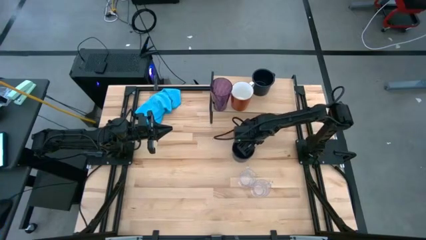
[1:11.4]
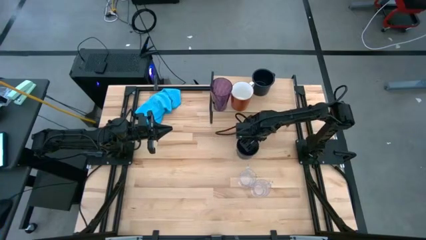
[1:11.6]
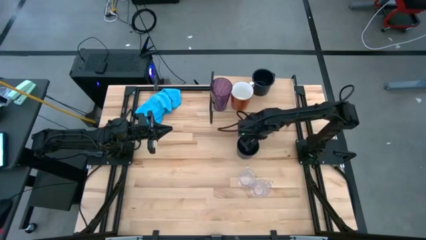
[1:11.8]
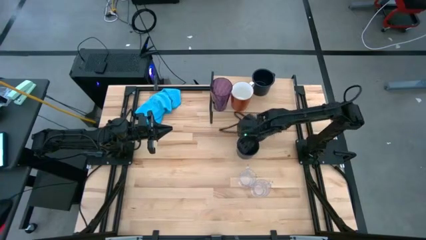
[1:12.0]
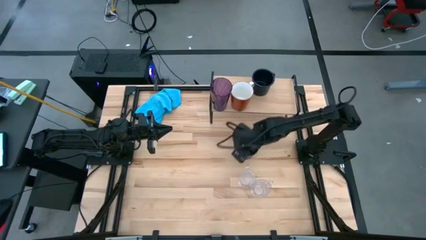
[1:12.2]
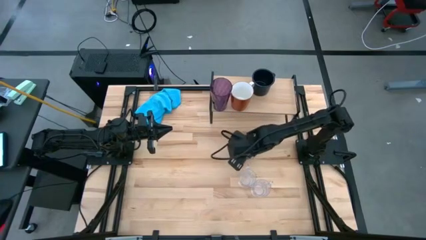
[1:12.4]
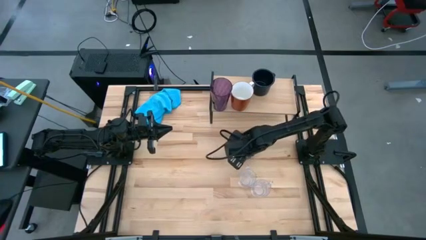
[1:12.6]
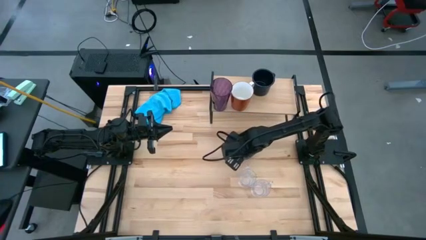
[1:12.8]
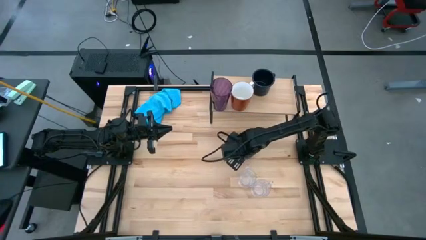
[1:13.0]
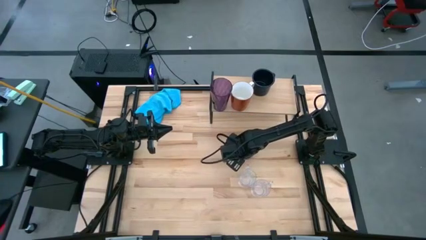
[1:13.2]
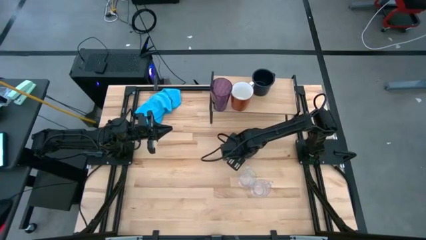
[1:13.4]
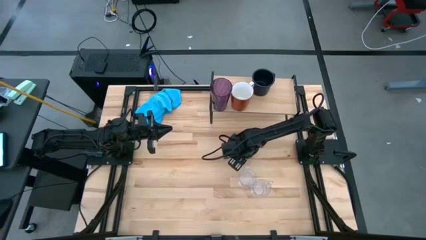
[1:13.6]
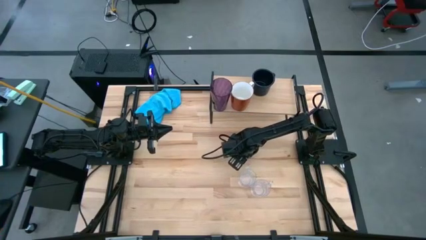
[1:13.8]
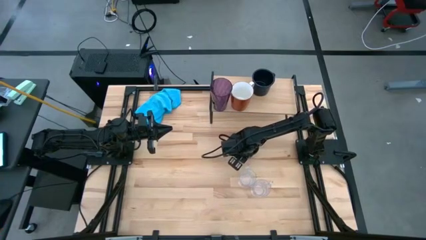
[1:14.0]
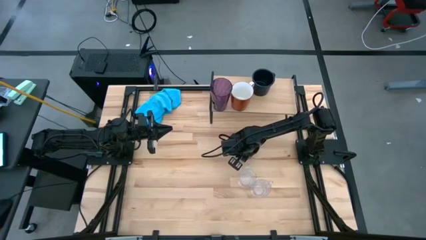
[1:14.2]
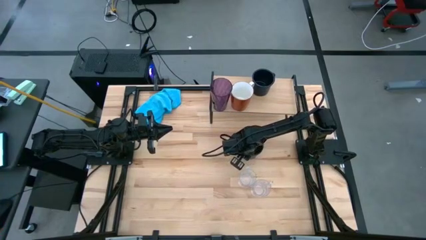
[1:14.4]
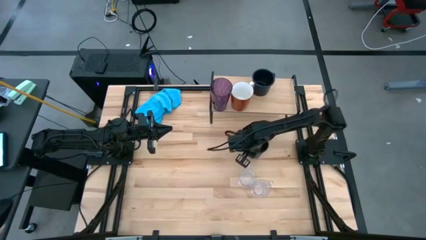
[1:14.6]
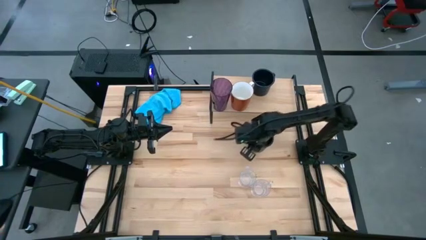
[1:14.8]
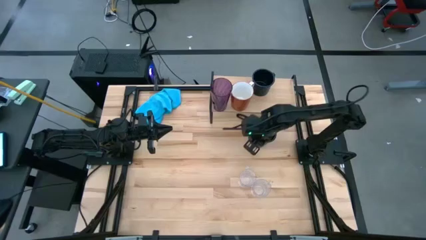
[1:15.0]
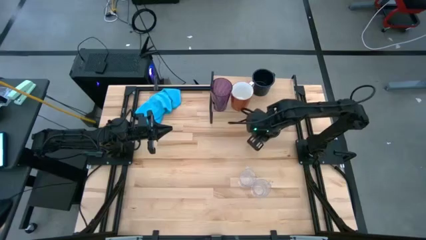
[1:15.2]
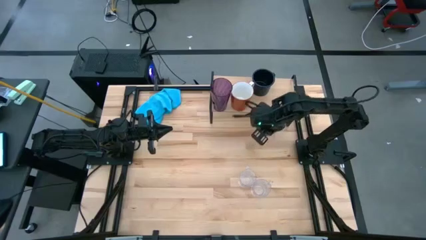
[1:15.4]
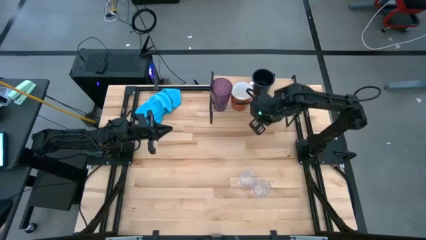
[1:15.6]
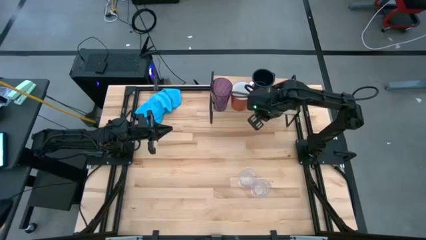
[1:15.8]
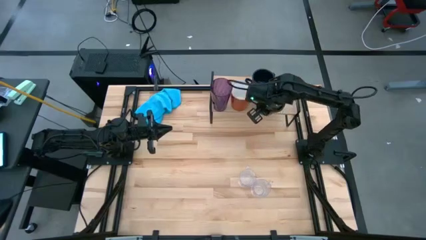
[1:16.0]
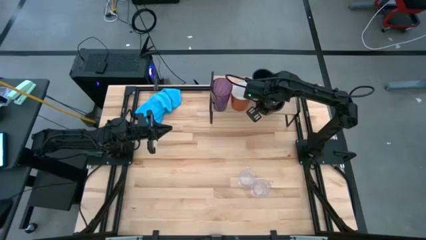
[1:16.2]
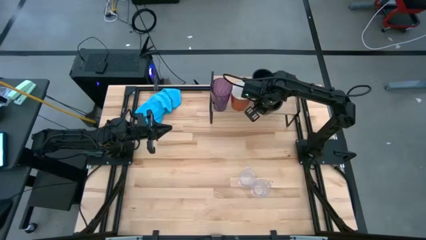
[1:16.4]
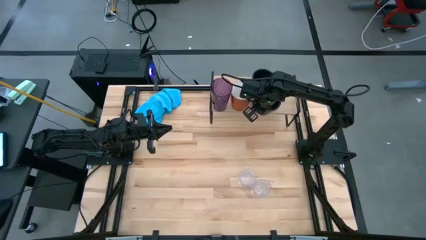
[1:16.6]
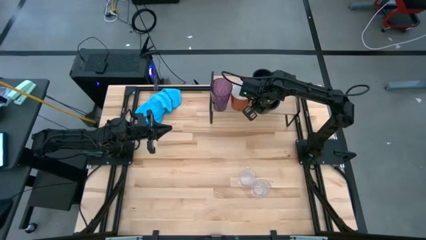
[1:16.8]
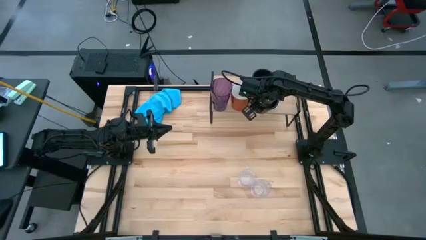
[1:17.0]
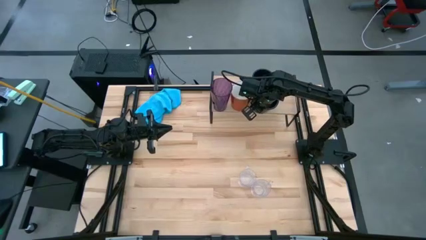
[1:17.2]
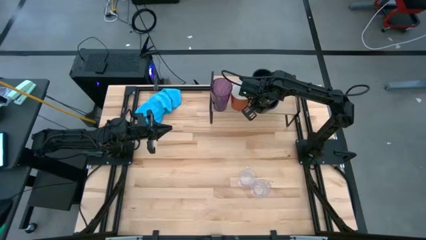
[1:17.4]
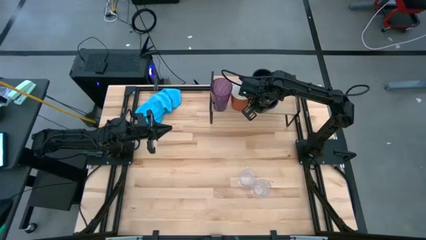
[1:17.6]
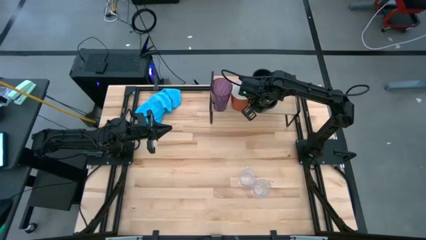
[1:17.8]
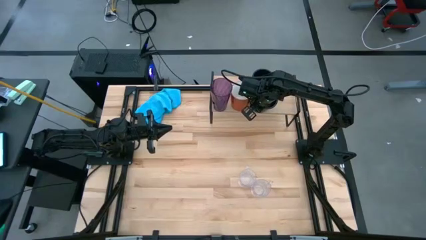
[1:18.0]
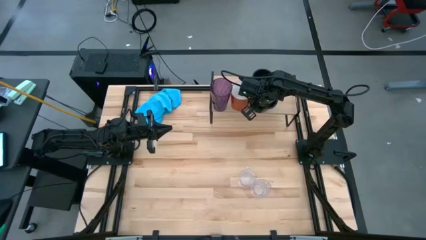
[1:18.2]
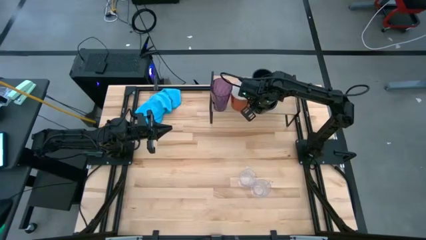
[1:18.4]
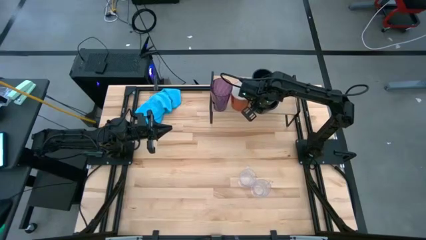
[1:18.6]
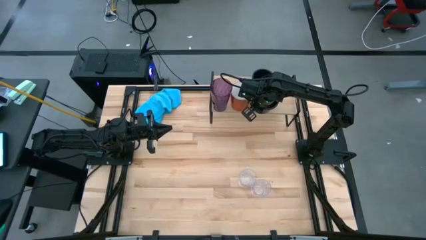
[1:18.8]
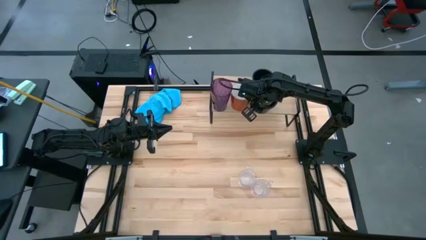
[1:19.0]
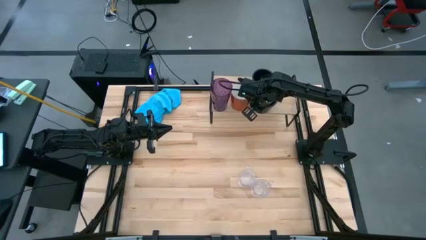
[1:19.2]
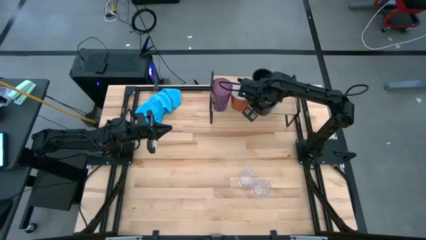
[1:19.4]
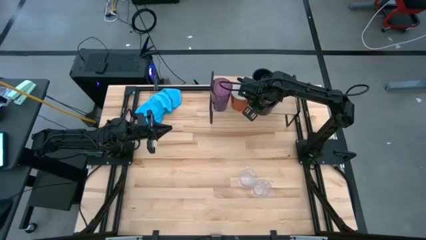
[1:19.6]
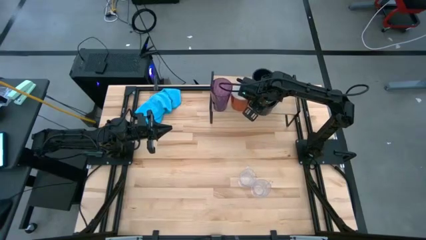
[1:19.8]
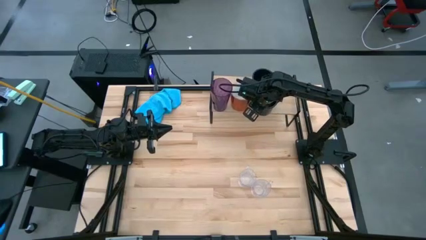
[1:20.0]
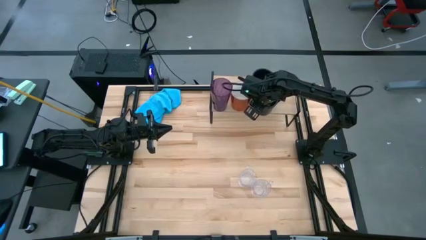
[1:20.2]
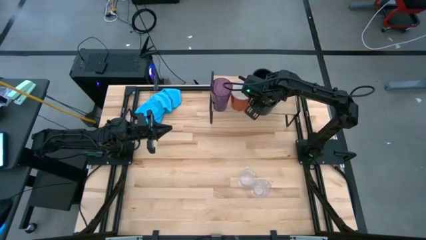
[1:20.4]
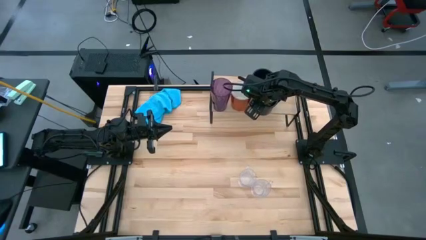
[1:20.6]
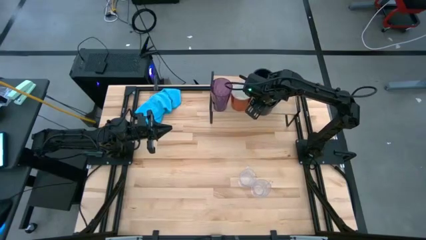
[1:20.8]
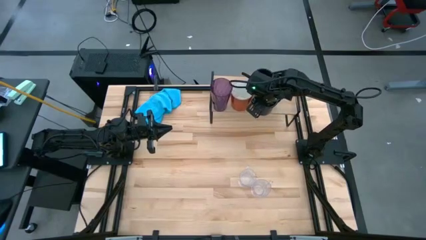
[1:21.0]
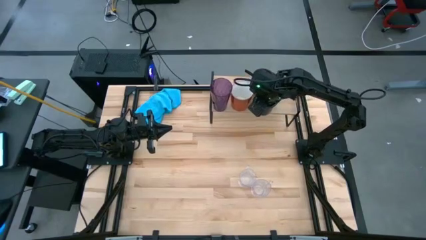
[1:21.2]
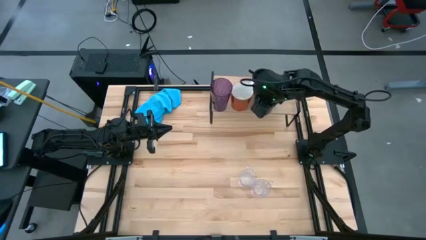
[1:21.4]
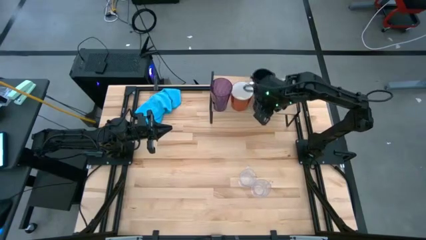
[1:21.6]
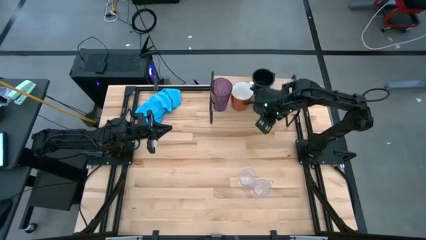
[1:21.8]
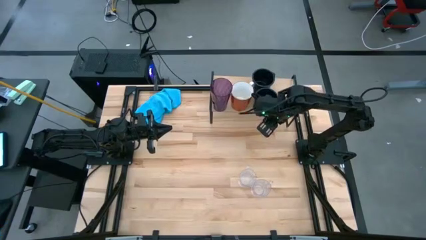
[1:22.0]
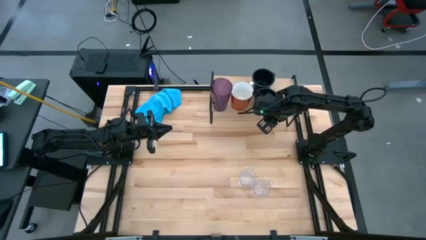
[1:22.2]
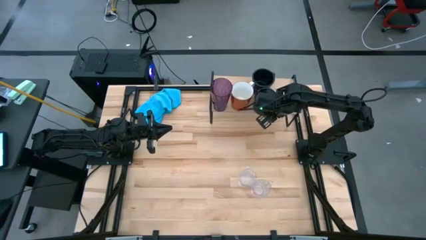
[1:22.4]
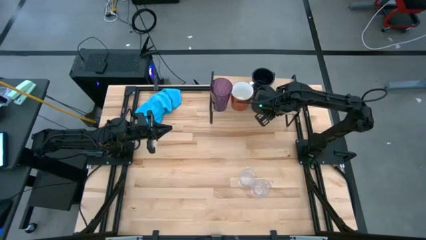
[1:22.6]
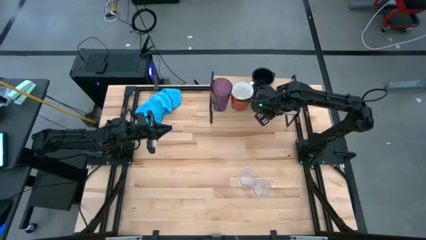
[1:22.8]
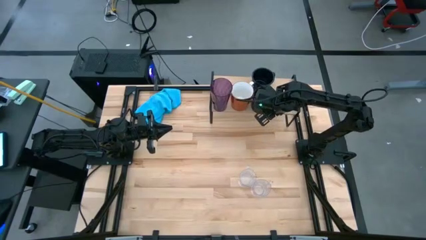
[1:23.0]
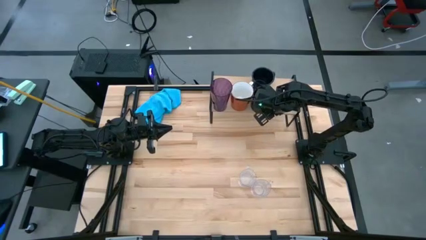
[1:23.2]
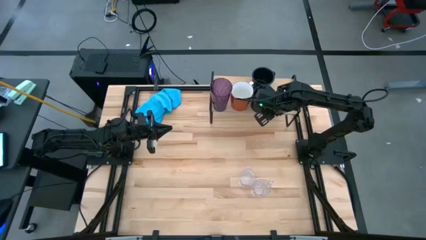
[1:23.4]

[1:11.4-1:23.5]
Task: Stack small to large cups/mugs on shelf
Put the black mug on the shelf aligned with the other black mug

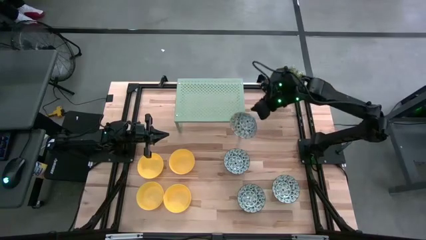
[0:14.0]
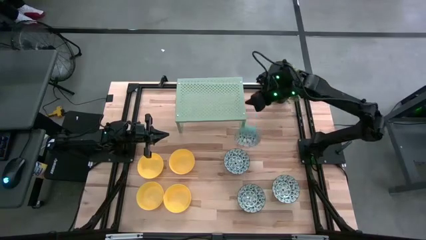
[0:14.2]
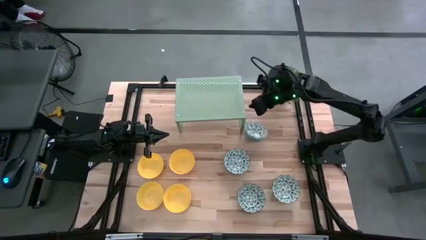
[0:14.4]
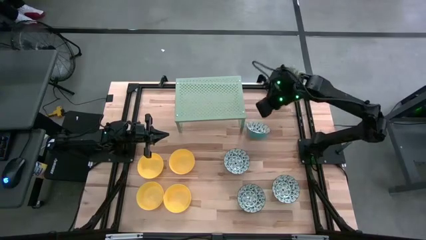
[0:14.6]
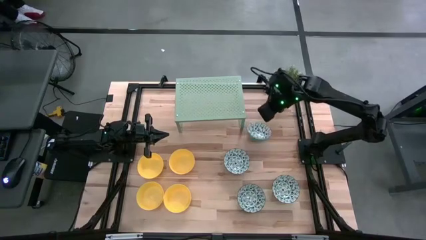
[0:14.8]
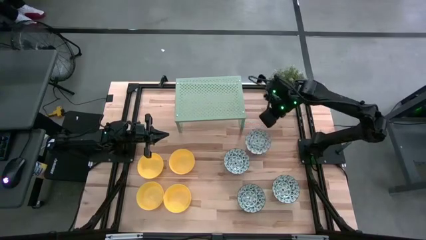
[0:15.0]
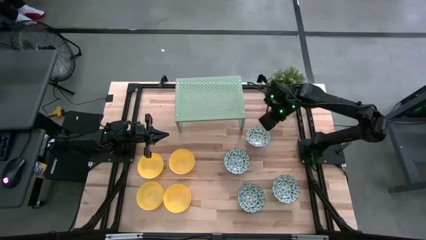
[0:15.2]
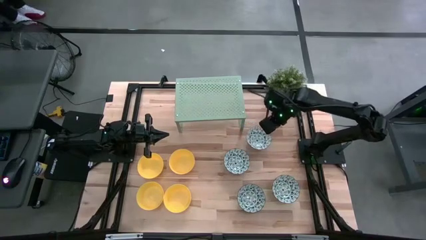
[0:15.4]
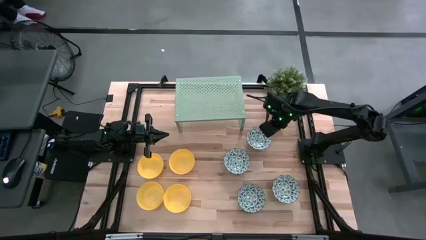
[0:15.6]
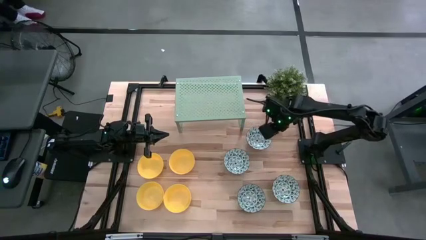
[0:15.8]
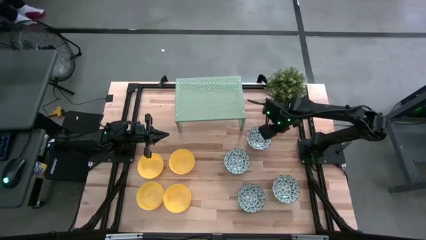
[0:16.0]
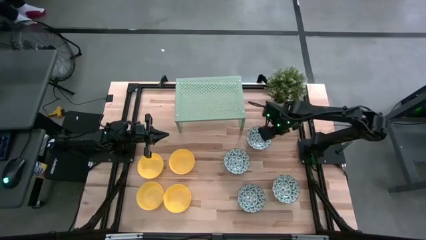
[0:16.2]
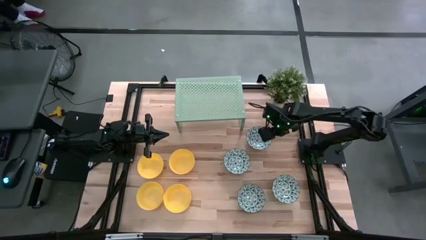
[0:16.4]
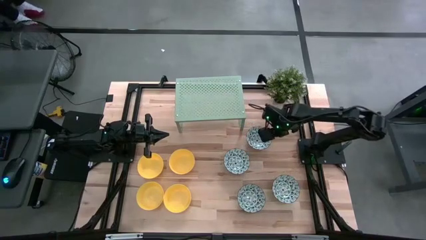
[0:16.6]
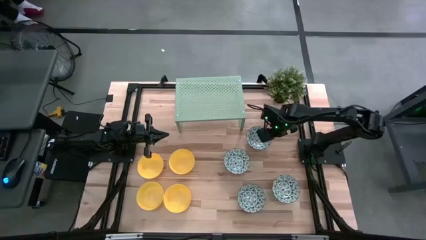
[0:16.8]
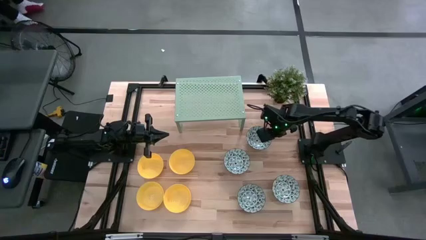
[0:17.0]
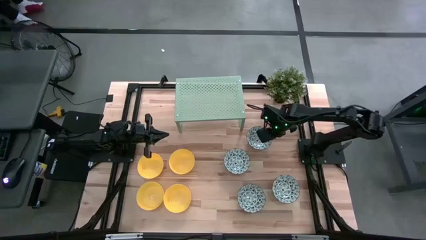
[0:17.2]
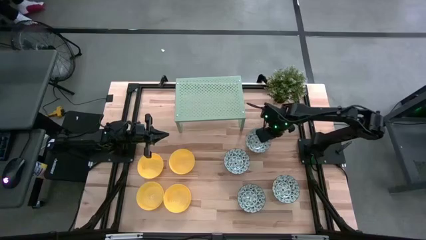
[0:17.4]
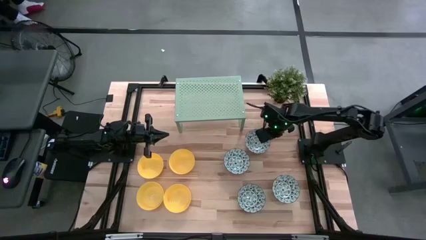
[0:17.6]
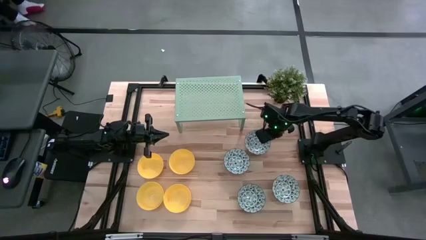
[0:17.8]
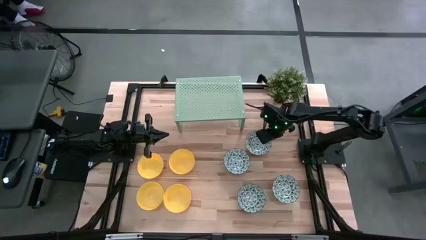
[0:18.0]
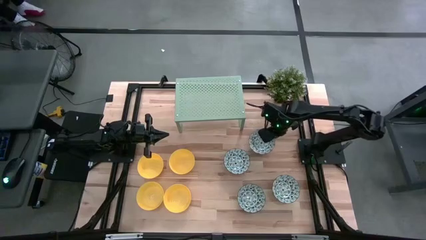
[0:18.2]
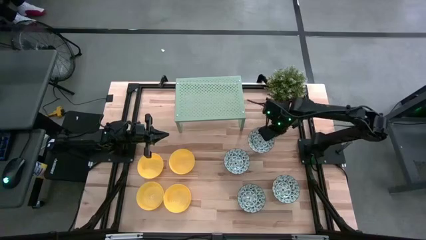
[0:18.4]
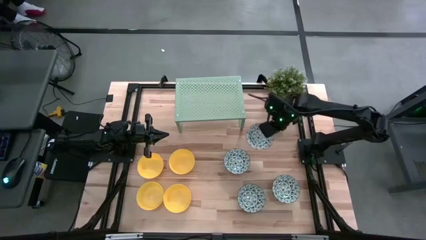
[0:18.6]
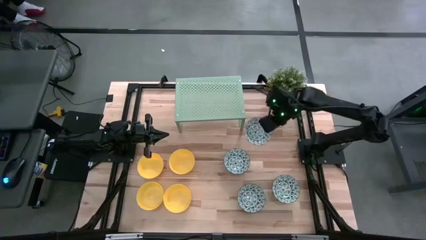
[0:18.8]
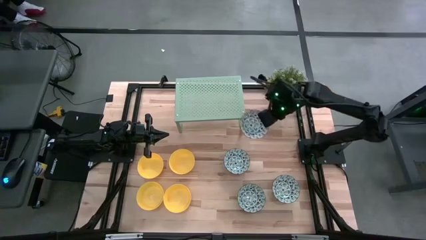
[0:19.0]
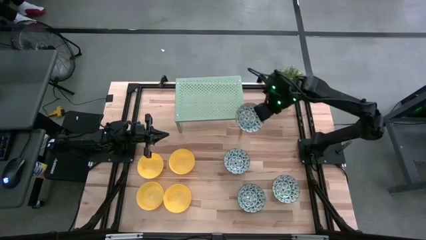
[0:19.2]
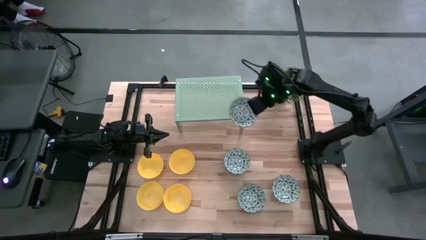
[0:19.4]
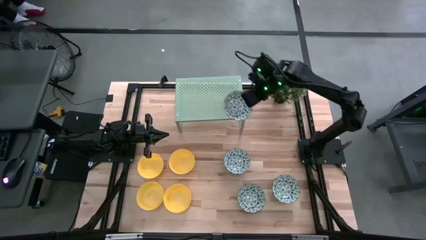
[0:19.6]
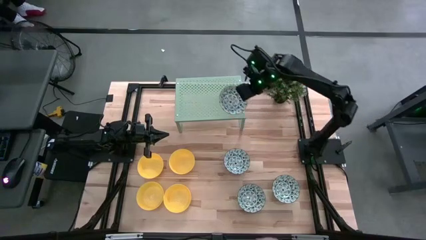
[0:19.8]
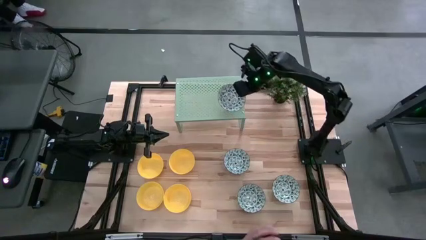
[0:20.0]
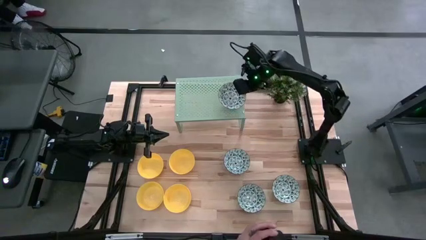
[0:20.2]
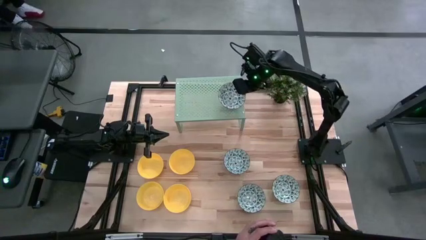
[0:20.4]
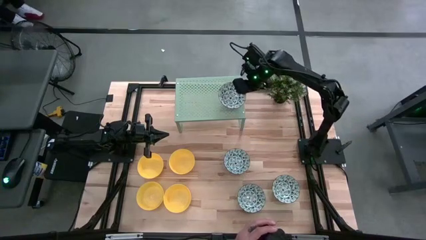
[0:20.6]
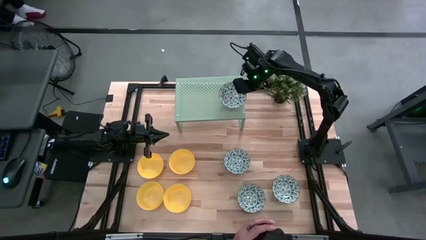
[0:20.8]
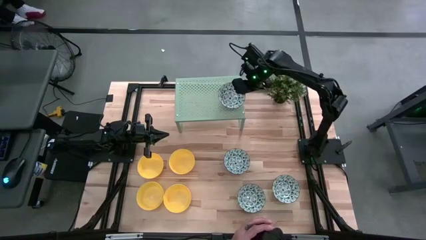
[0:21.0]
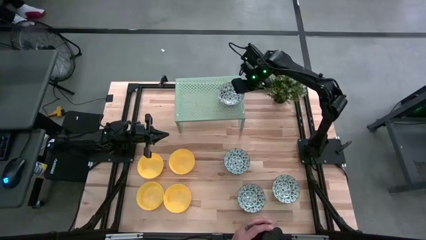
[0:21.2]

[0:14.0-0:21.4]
Task: Pick & Place Mini bowls
Put the blue patterned bowl on the shelf
